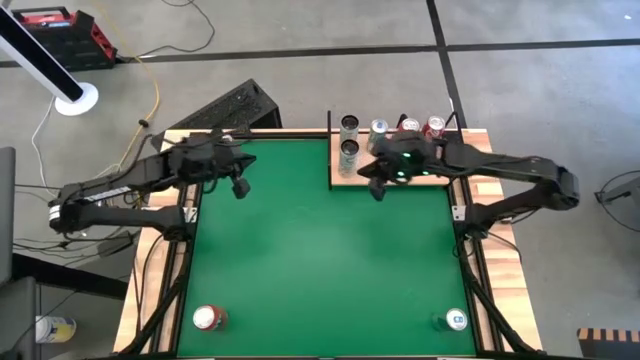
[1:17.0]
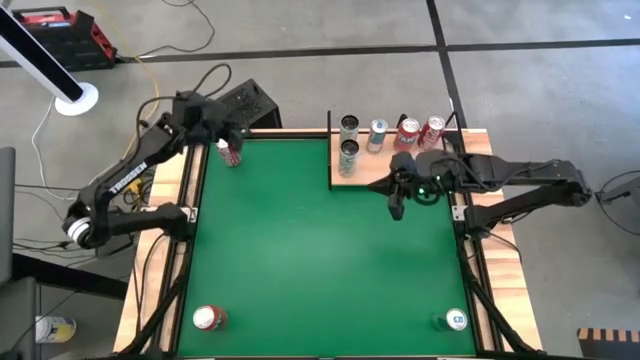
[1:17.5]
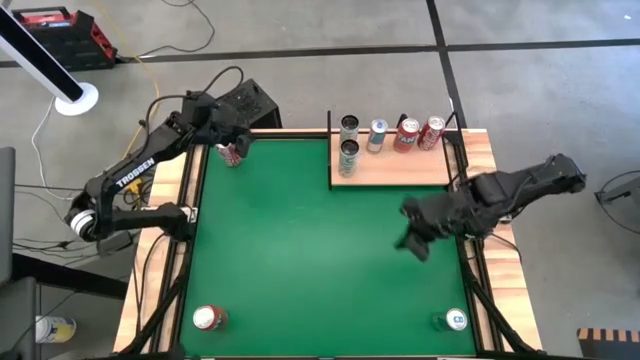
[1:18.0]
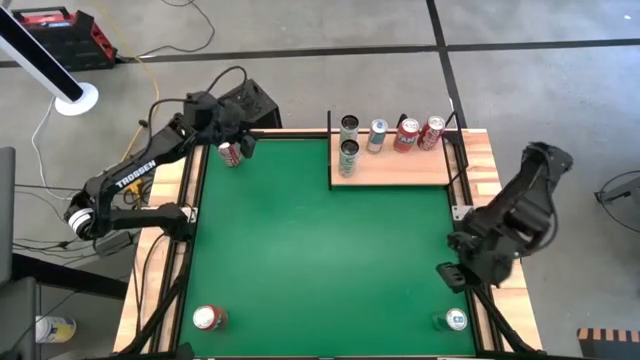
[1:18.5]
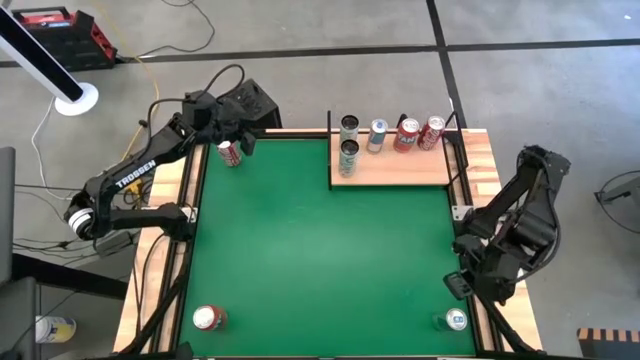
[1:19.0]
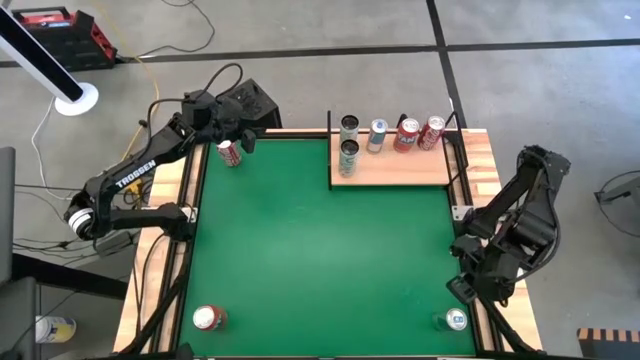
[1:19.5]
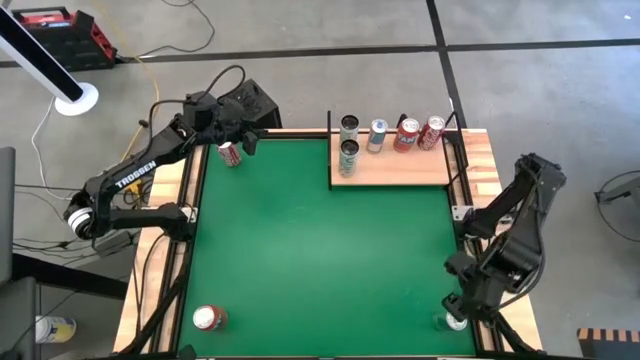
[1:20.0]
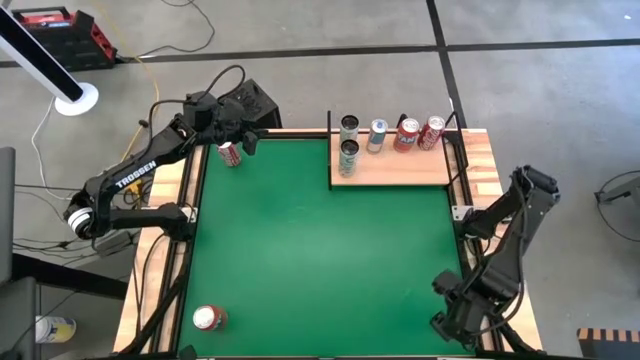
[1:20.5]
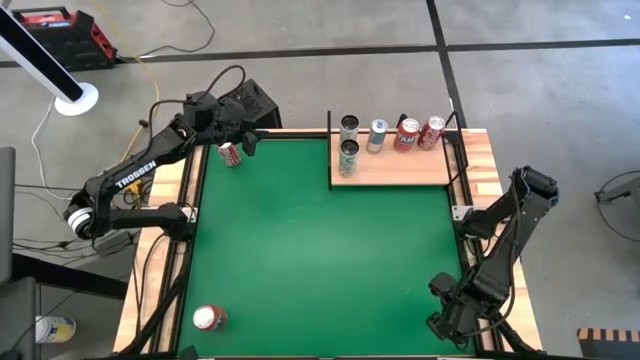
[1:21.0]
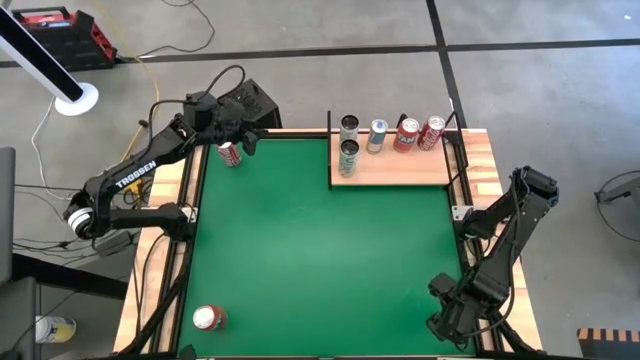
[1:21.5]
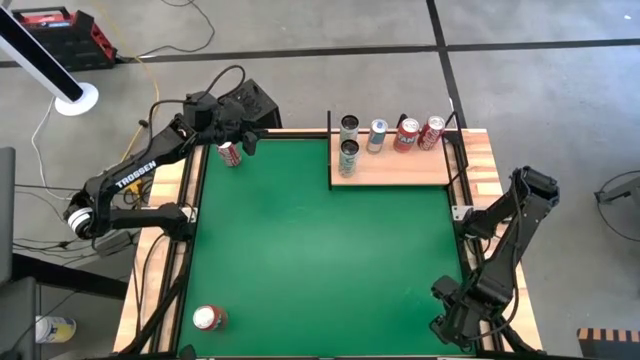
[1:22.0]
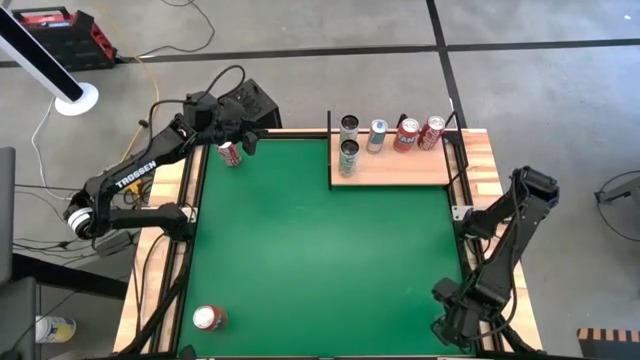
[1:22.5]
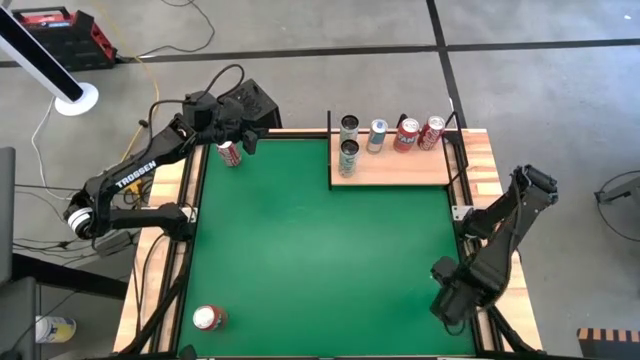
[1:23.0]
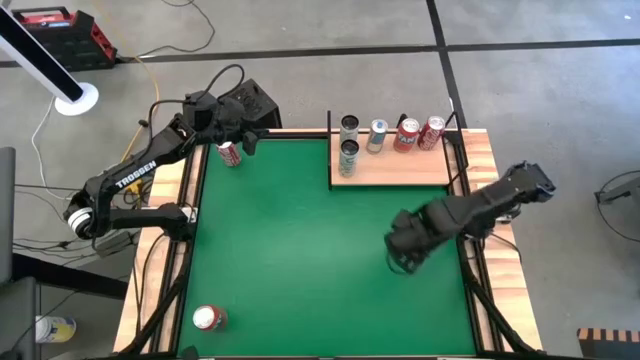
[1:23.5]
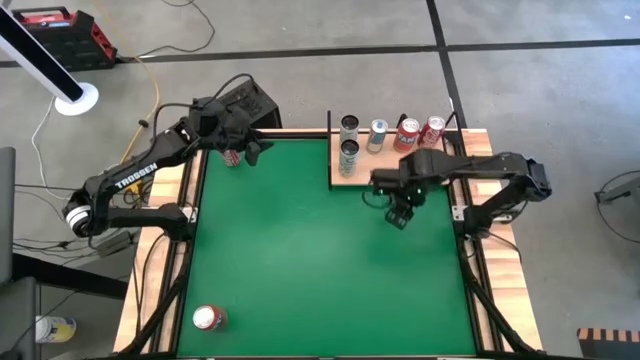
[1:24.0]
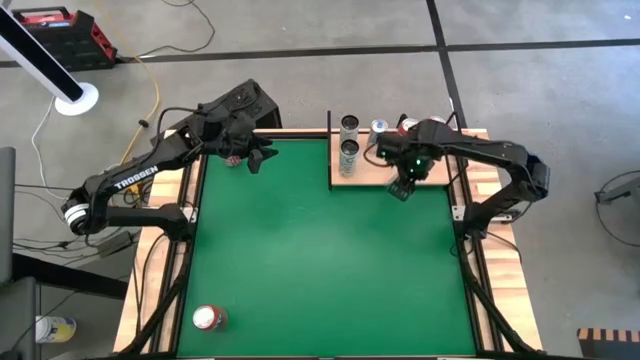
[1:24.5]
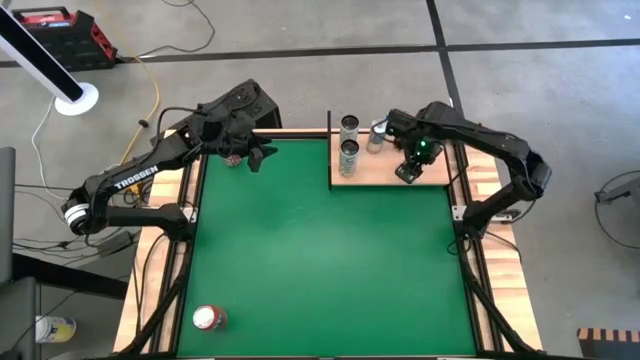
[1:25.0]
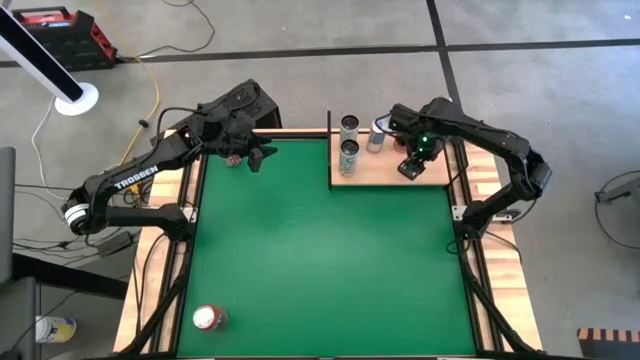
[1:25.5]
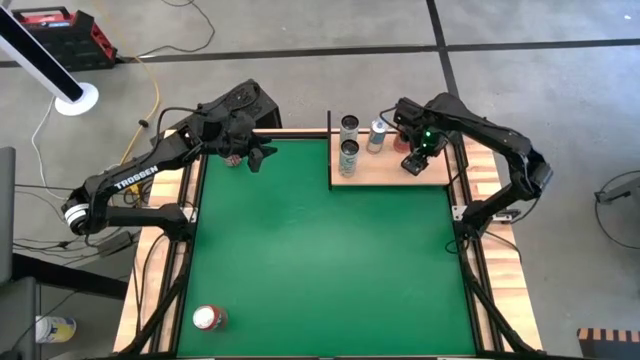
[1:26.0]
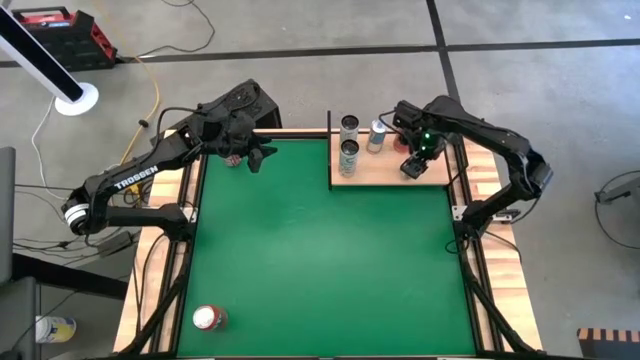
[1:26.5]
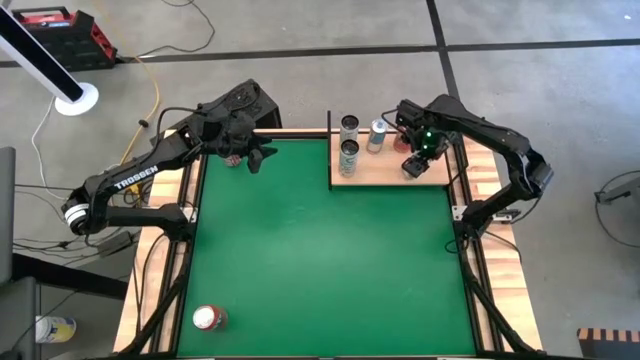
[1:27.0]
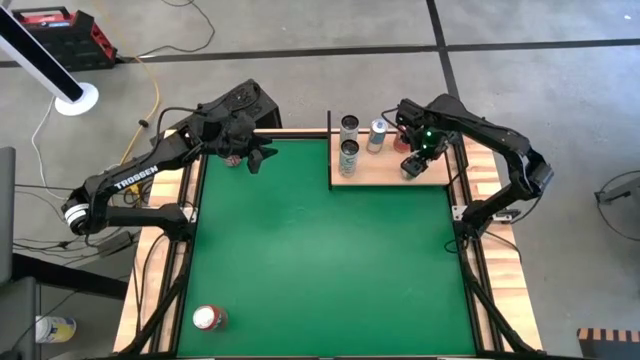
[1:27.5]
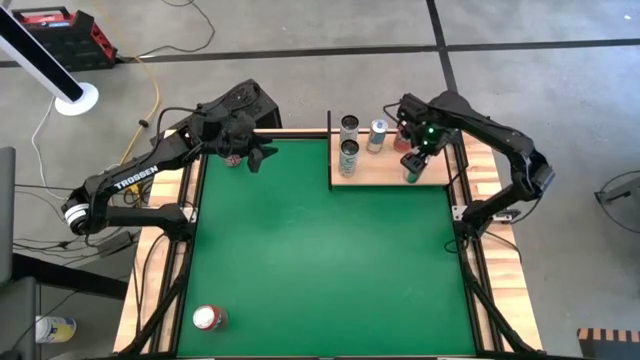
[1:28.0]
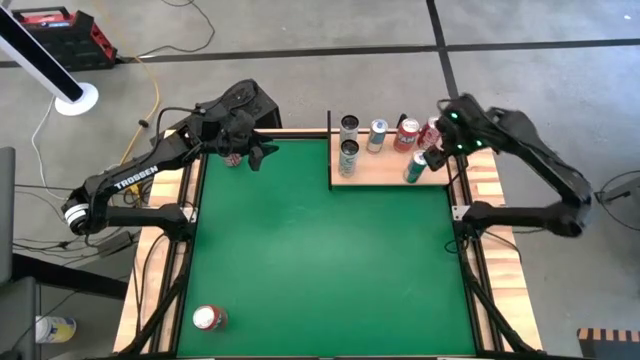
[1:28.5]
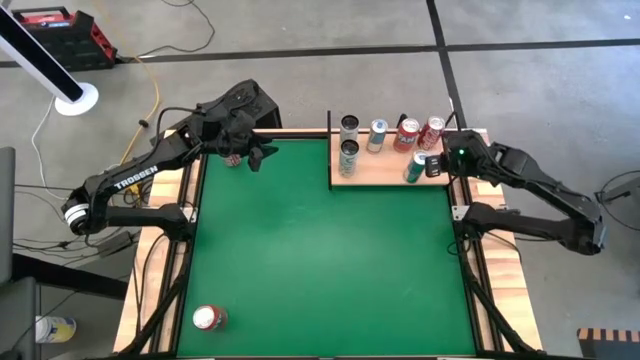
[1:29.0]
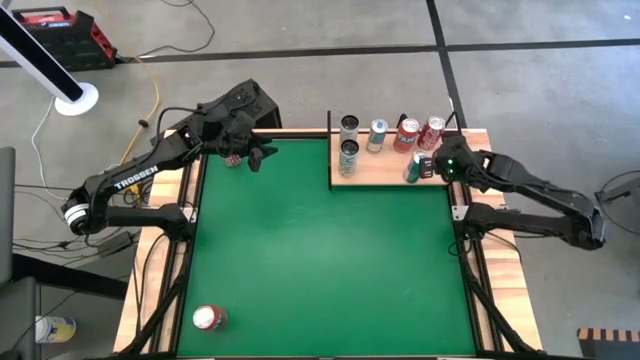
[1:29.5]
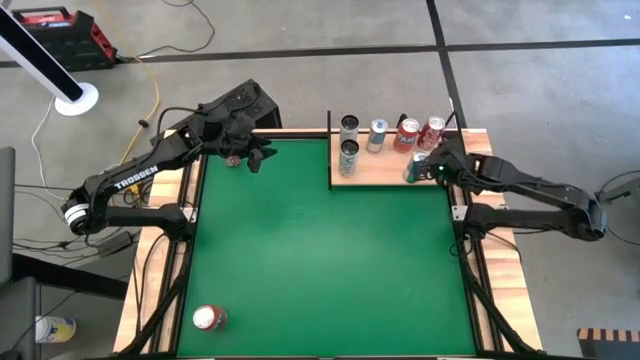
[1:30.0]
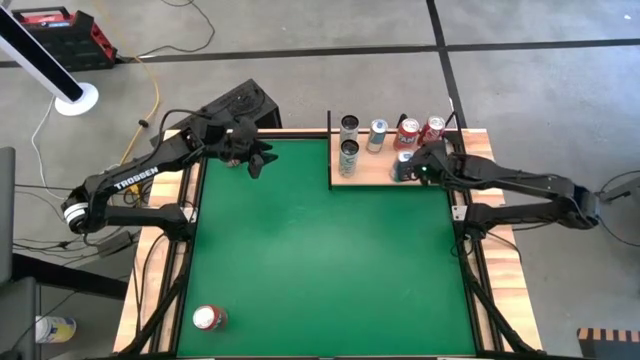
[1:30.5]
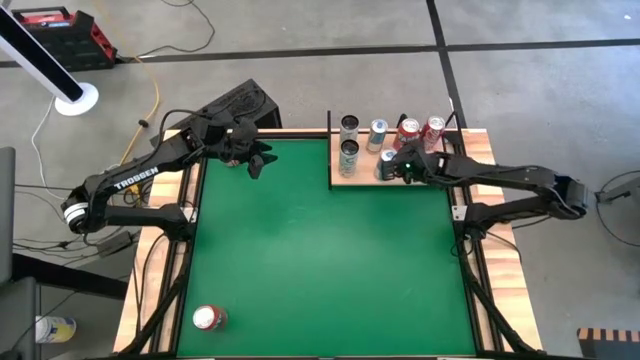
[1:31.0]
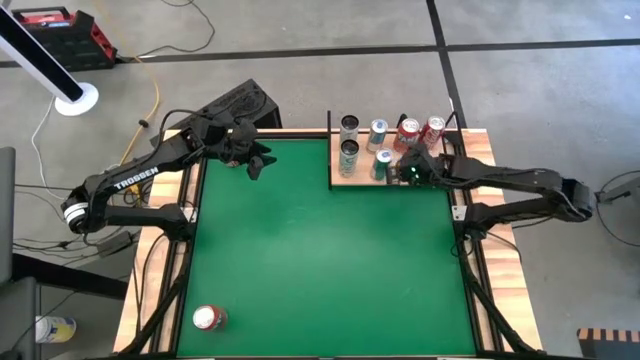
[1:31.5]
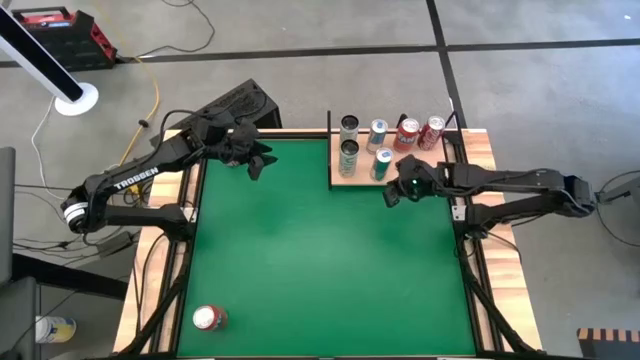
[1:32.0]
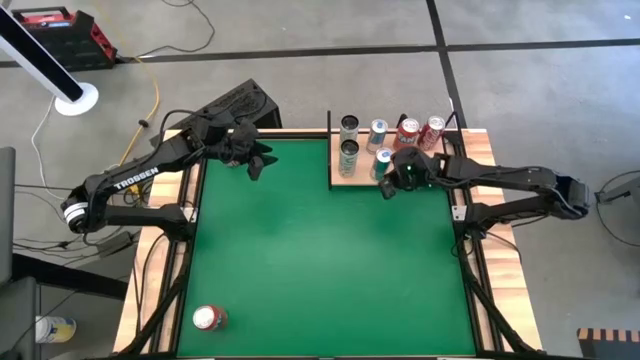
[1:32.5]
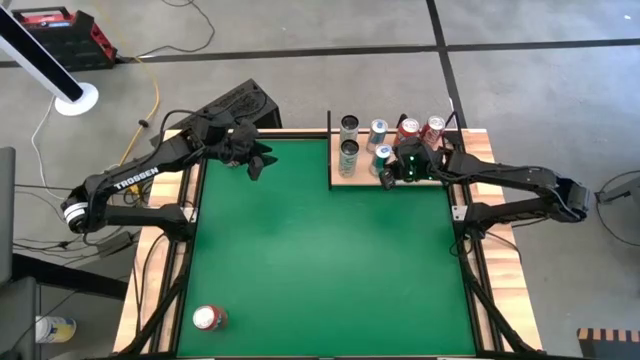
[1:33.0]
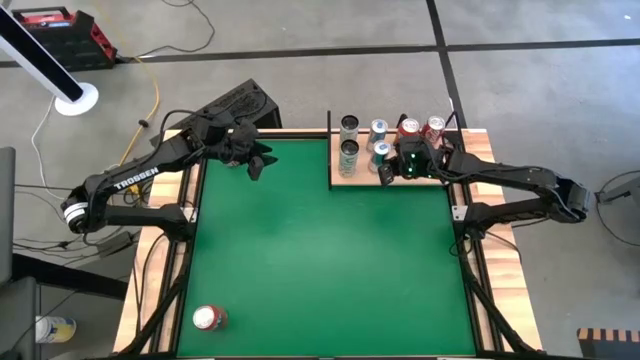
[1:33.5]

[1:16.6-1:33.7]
Task: Place canned beverage on shelf
Put the blue soda can on the shelf aligned with the other blue soda can
